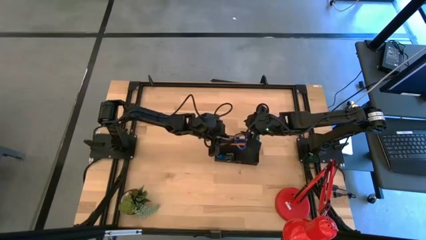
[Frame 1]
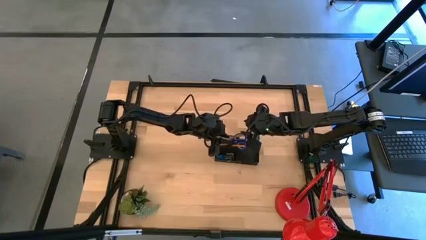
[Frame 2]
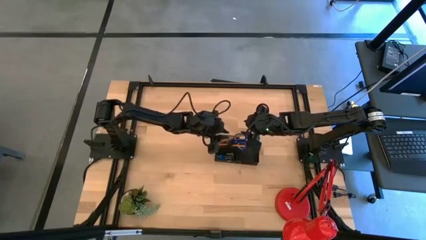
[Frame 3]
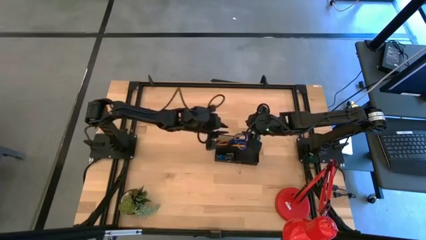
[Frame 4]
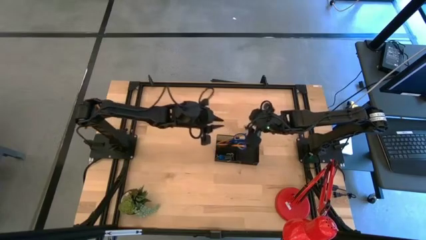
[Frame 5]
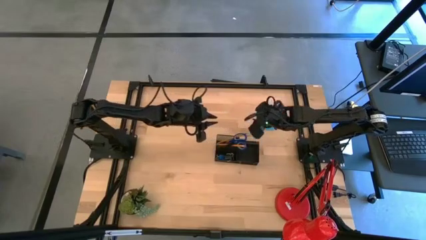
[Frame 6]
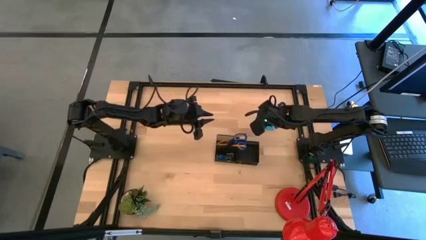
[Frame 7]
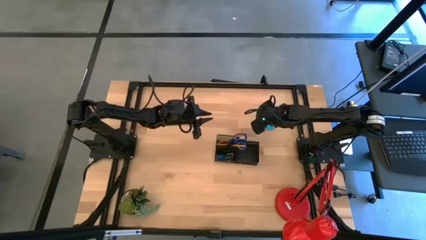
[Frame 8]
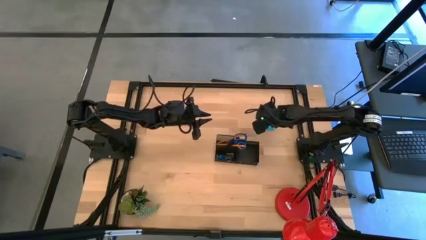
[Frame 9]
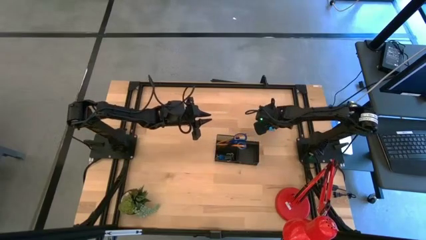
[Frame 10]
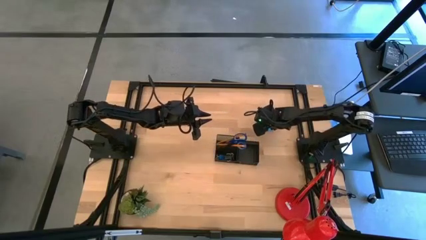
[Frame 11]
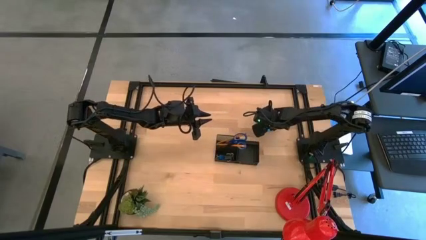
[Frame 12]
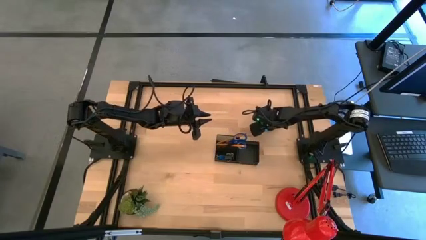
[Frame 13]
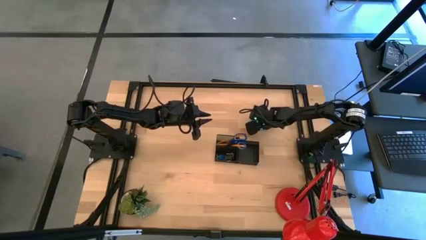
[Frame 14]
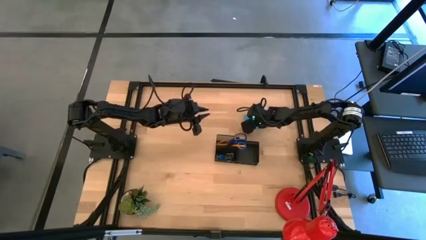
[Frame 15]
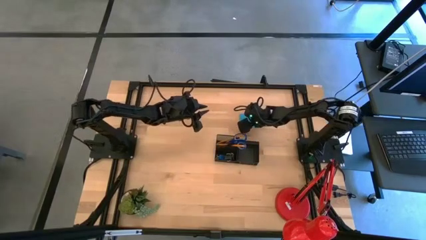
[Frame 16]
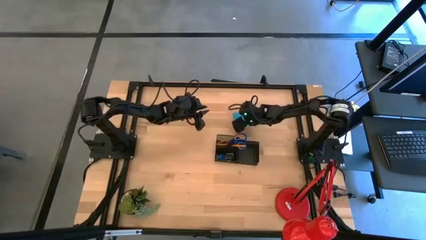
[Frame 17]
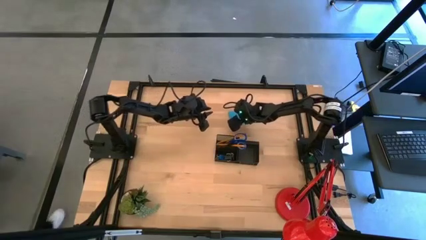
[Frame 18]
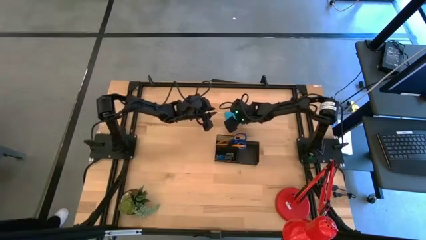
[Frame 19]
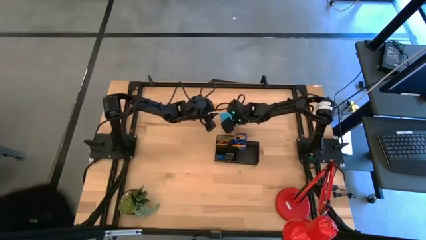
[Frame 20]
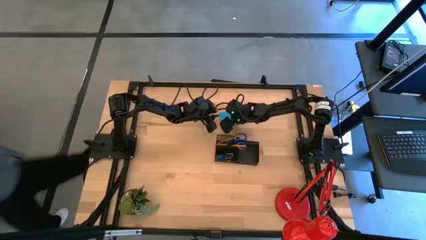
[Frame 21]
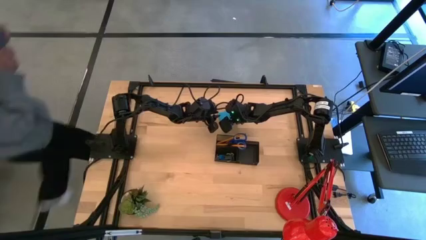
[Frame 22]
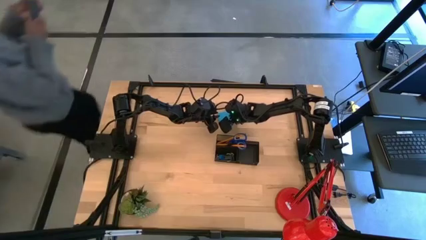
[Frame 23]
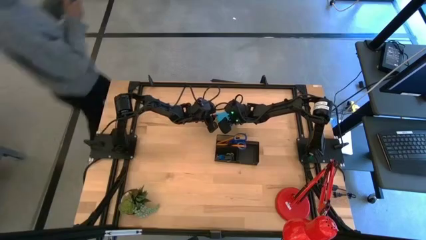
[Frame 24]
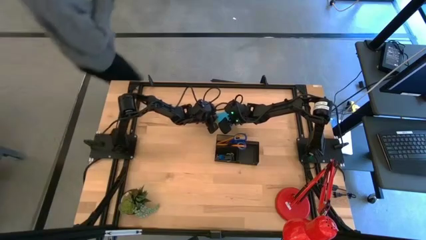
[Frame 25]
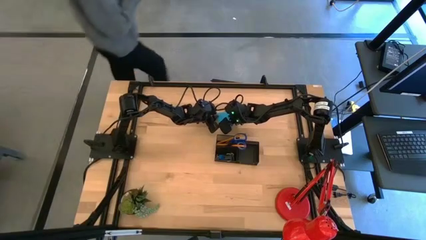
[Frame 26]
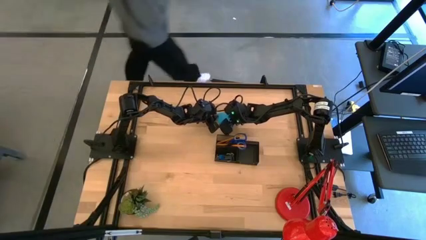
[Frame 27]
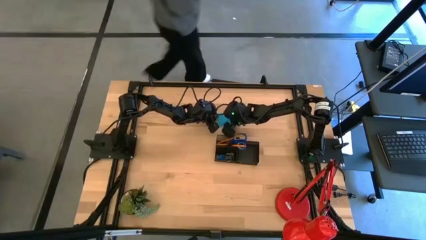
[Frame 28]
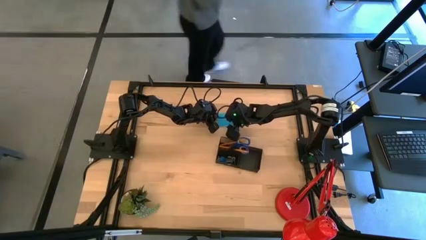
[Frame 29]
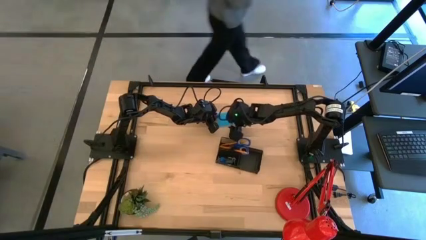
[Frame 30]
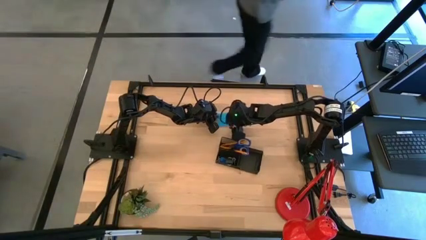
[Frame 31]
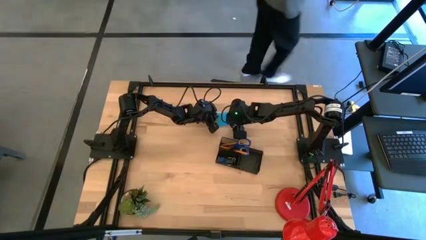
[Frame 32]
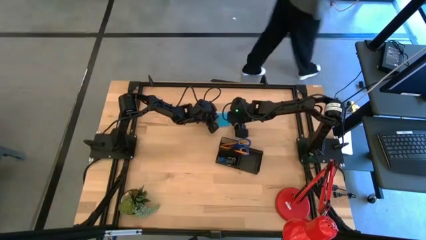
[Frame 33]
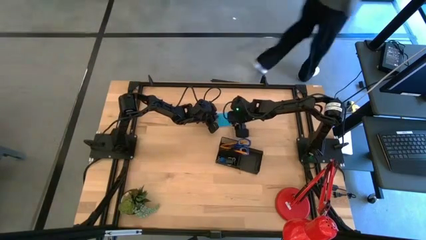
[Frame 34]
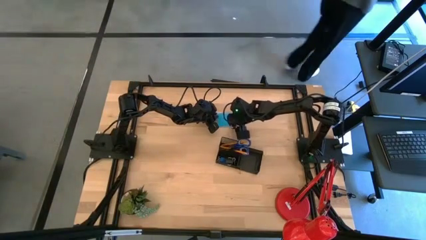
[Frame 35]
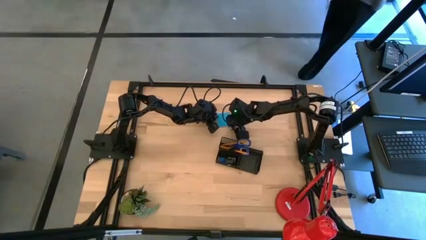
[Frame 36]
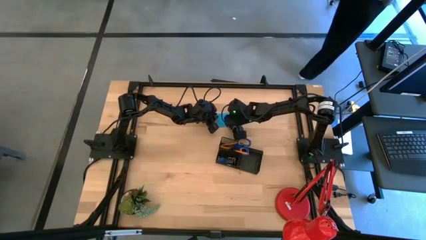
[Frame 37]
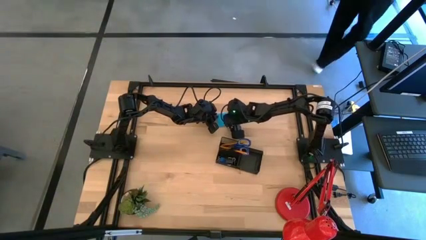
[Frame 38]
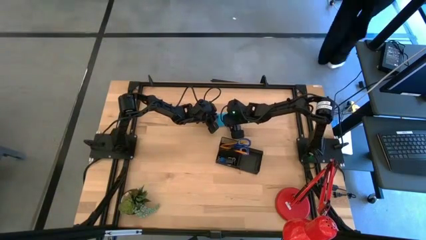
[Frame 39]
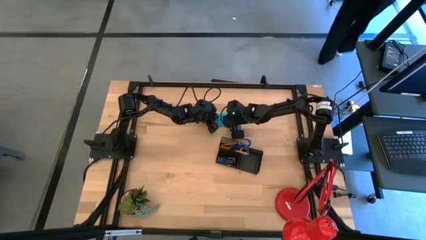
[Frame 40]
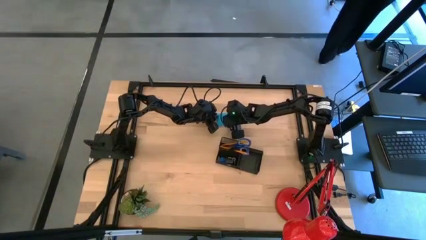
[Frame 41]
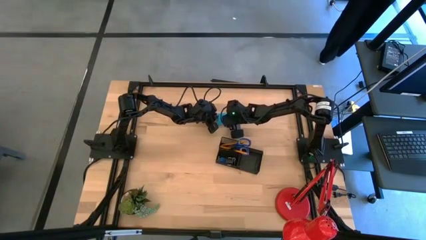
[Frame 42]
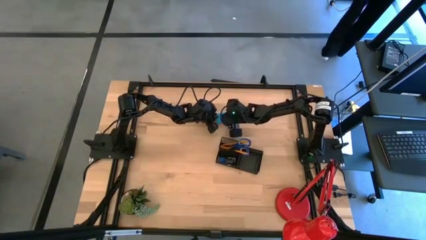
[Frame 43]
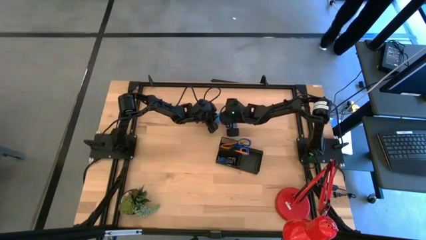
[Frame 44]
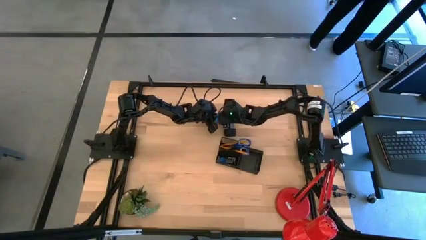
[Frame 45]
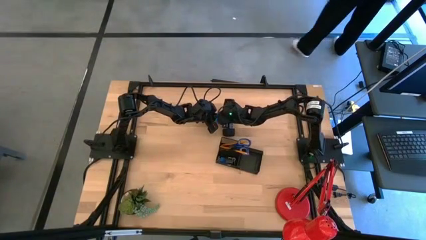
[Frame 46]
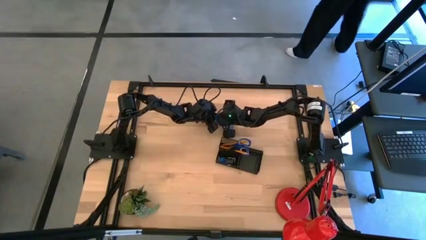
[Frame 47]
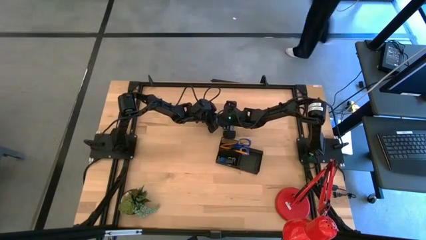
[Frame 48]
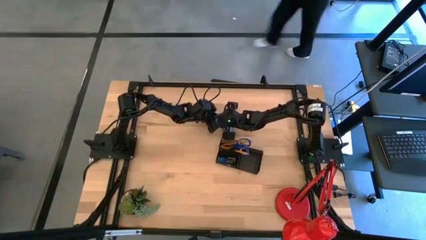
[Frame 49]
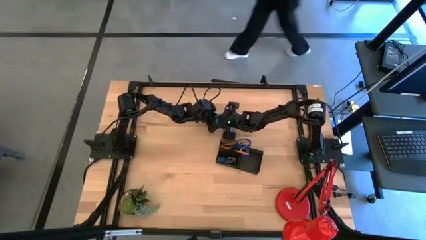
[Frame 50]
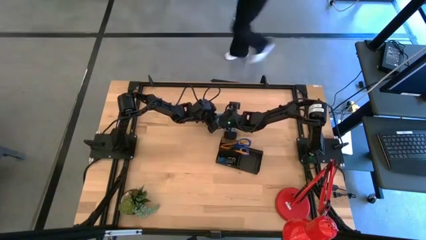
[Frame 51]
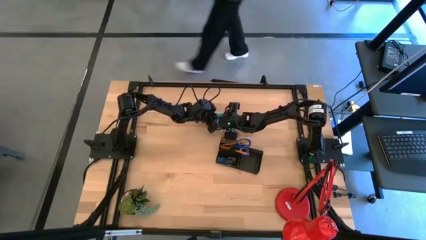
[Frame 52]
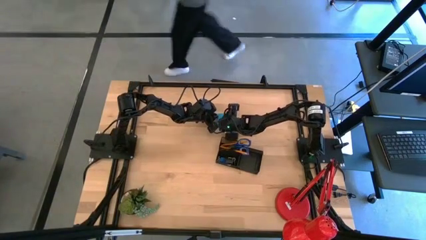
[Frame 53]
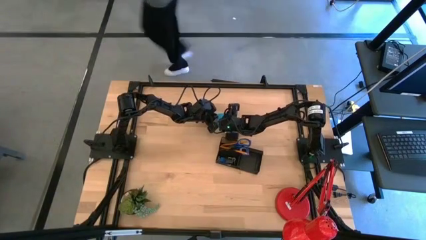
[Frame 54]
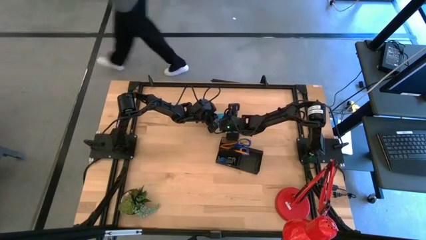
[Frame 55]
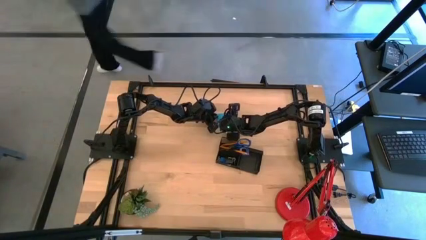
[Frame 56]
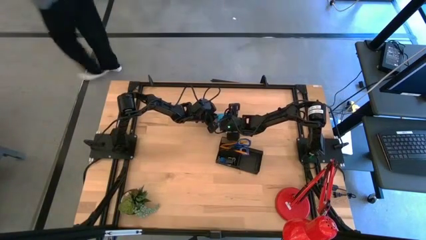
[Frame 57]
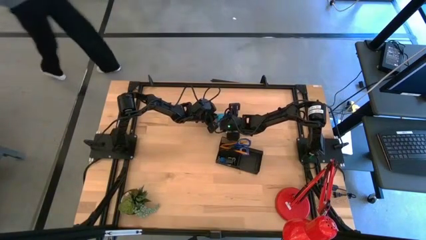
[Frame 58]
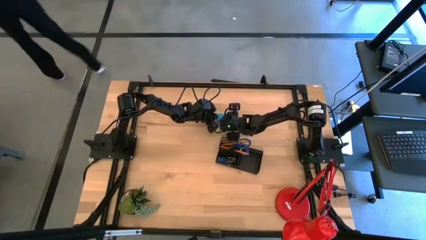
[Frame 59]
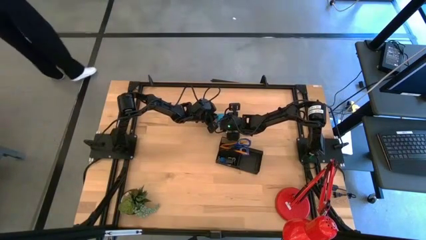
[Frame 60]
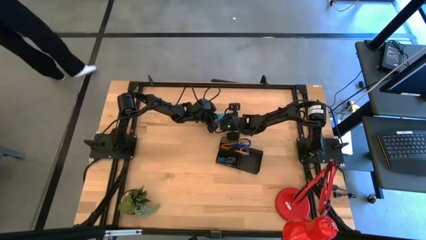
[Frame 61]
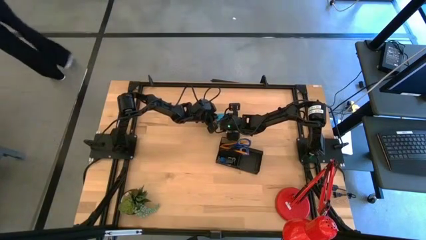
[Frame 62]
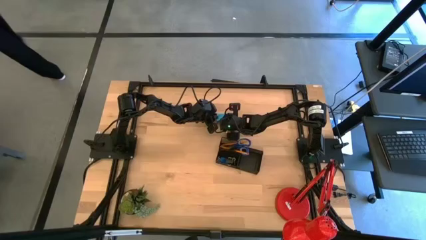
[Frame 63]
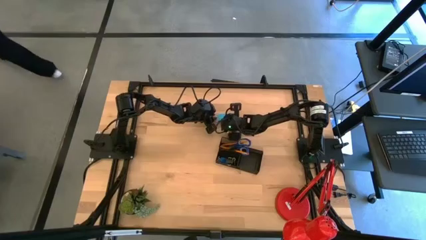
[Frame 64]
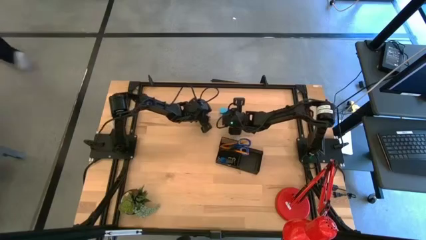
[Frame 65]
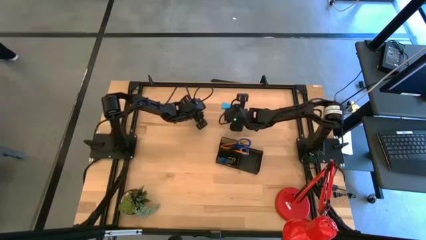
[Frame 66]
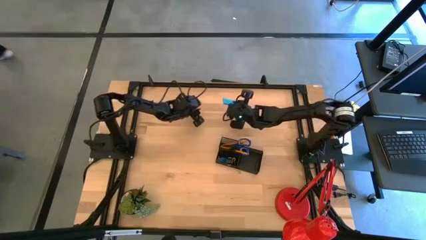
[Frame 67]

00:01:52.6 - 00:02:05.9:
Task: Pick and place office supplies into organizer
Put the blue sticky note pad into the black desk organizer

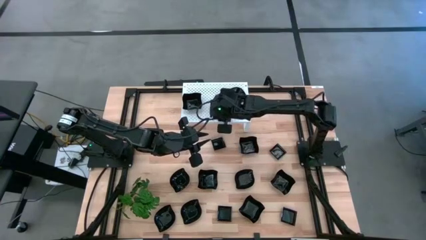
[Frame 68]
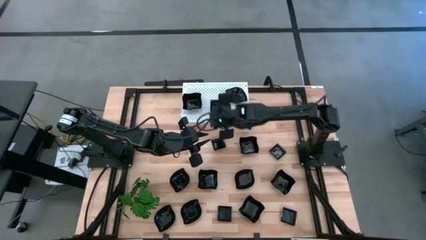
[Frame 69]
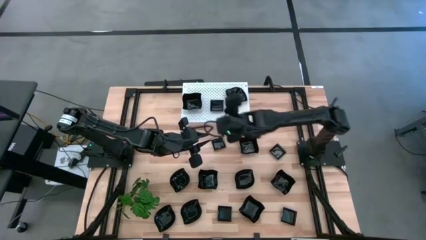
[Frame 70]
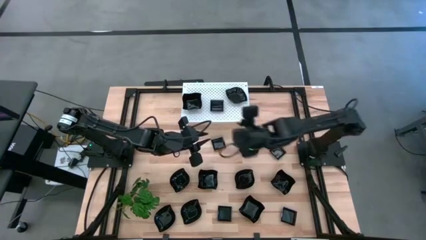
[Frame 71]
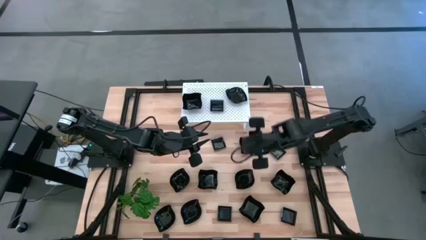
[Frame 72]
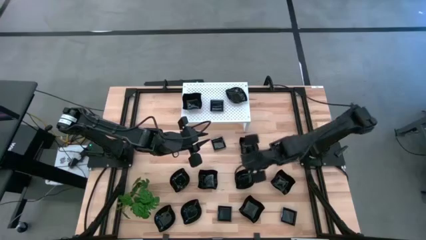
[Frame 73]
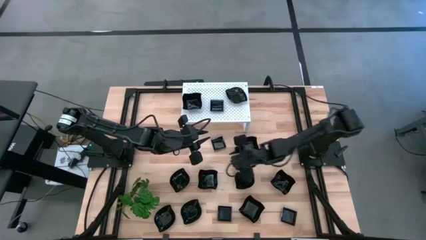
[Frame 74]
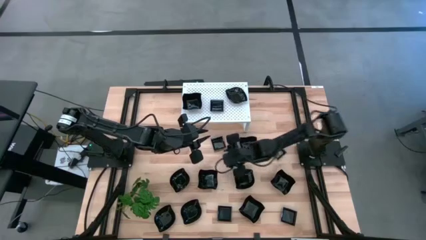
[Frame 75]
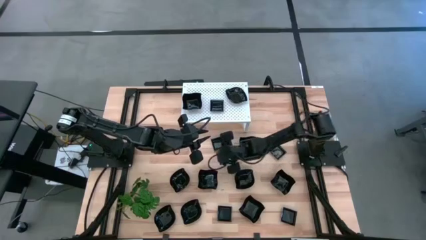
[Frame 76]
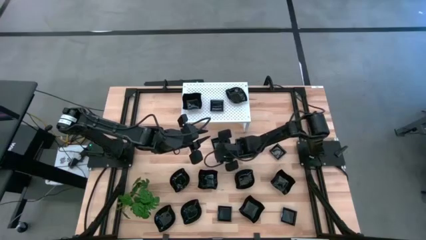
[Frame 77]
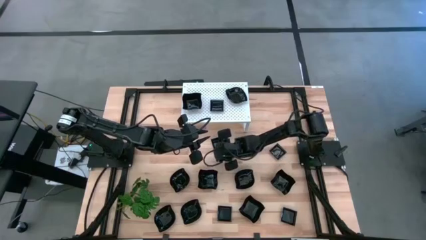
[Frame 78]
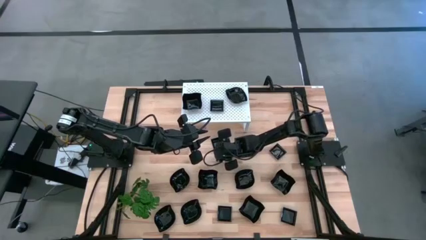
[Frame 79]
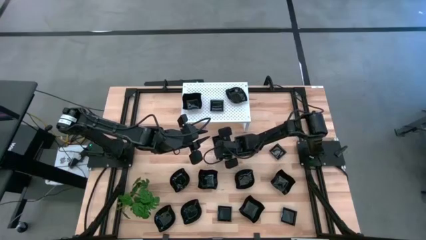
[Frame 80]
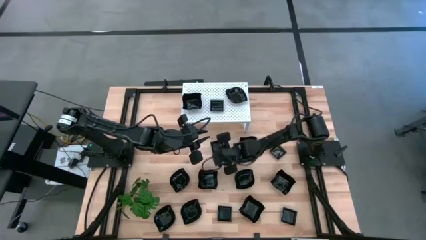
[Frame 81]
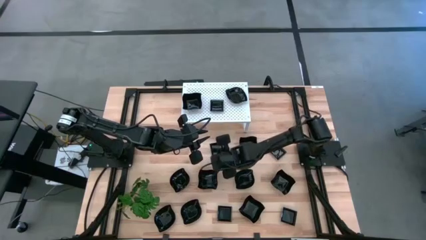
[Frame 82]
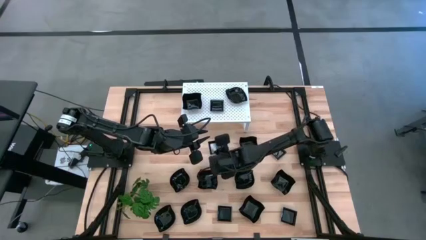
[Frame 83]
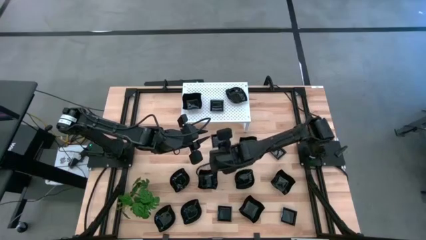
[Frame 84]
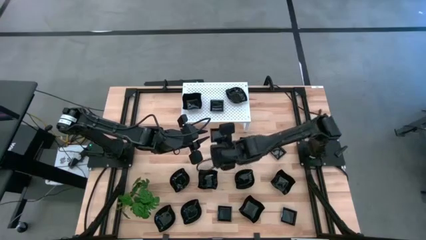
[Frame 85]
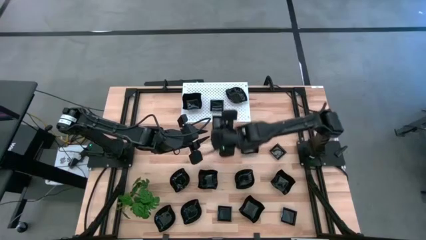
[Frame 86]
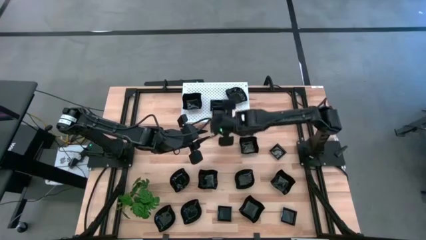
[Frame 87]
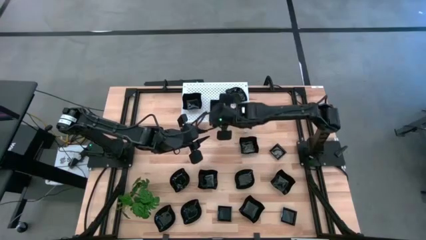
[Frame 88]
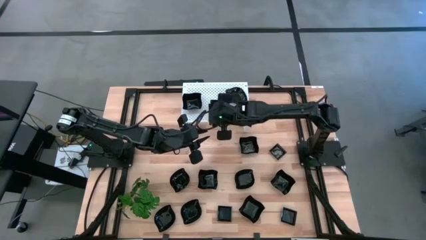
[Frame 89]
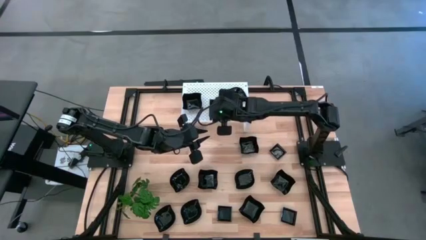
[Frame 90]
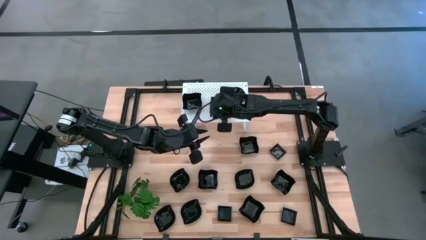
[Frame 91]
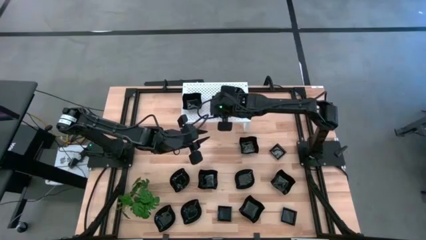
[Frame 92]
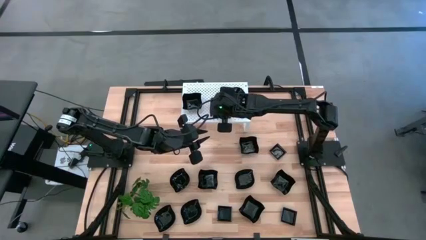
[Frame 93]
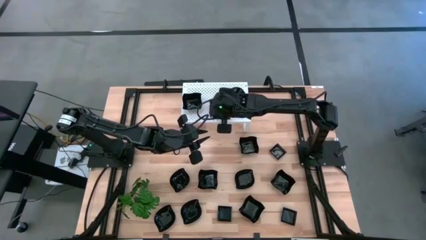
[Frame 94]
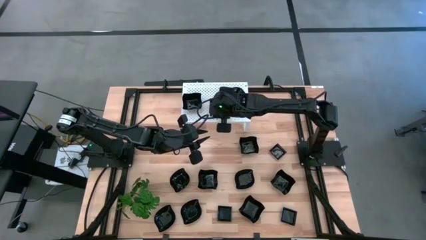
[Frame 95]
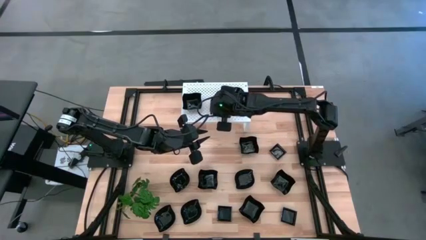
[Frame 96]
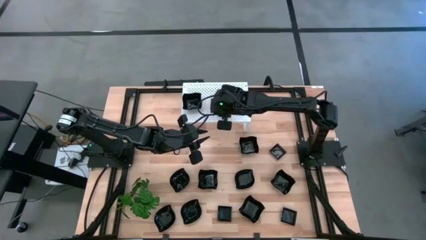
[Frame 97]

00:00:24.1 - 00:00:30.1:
Task: Pick & Place Mini shaped plates
Stack the square plate on top of the other square plate on the shelf
